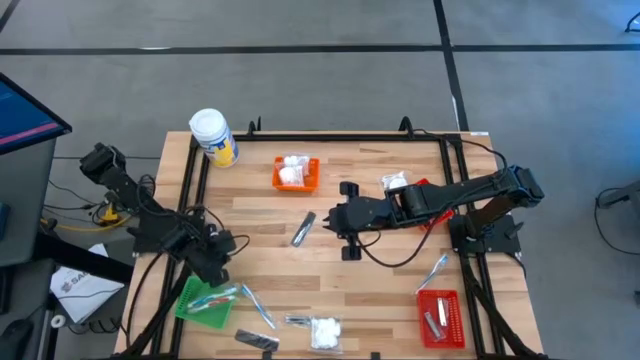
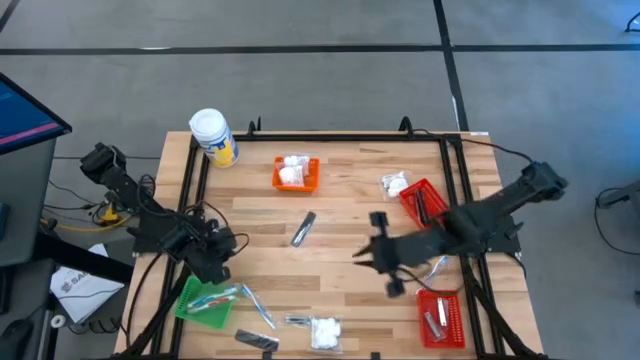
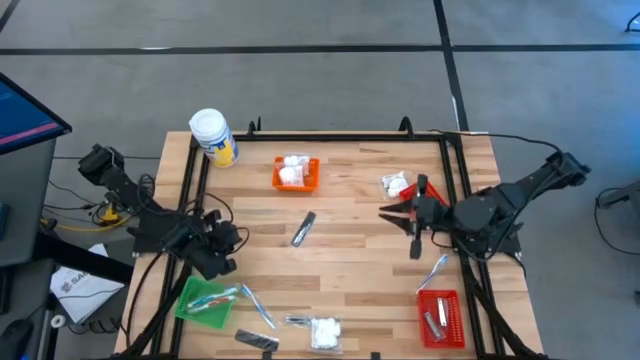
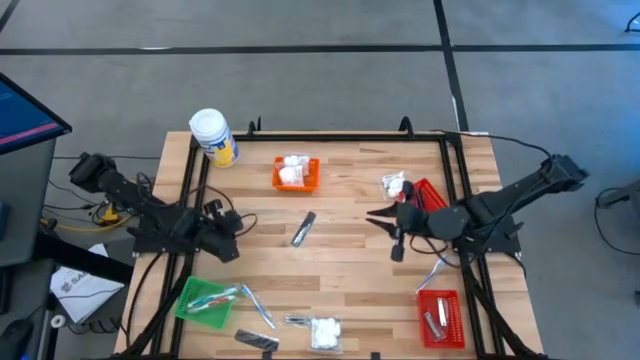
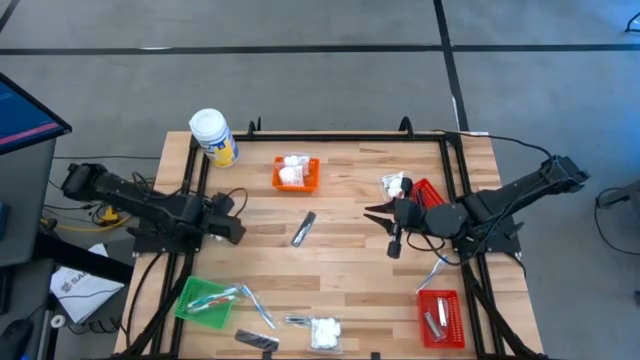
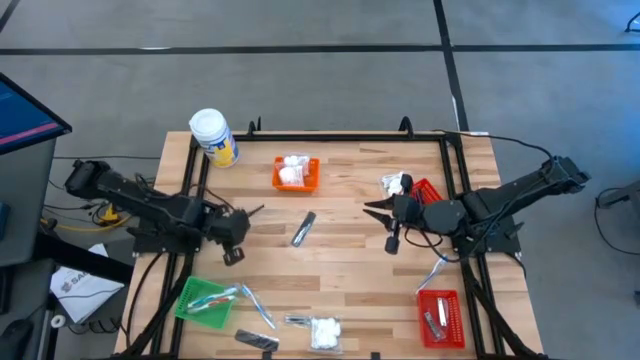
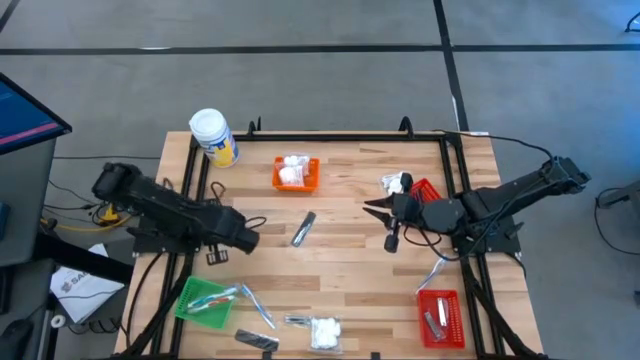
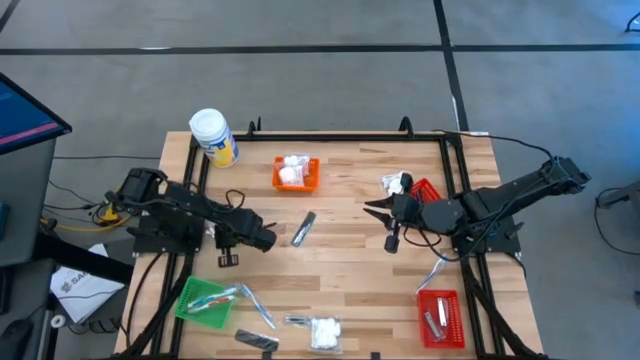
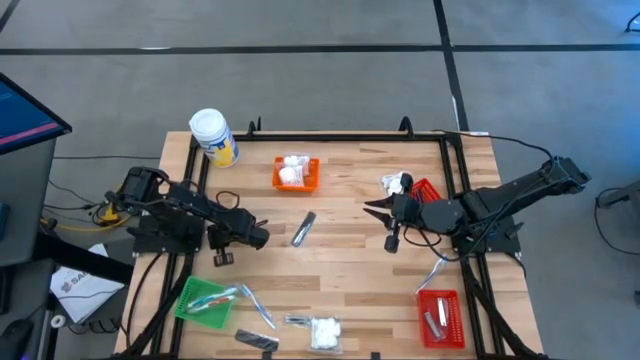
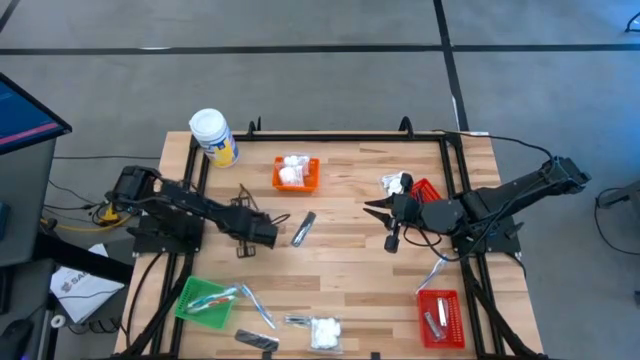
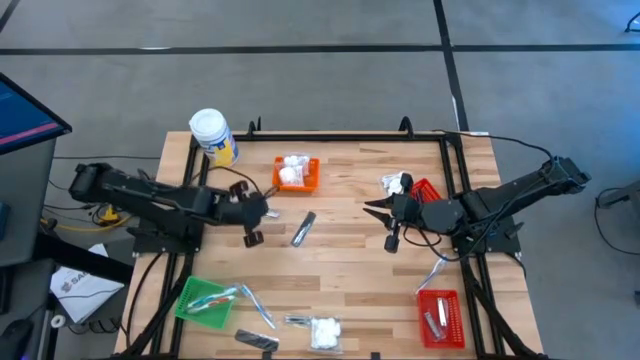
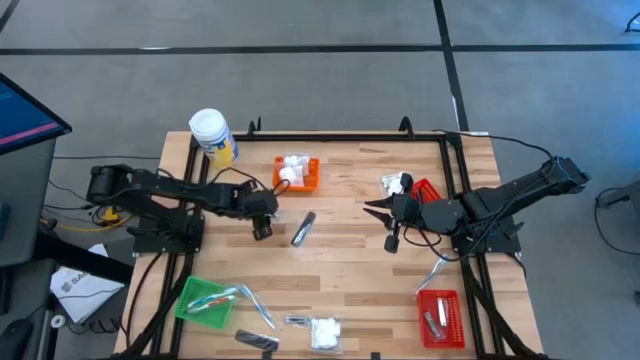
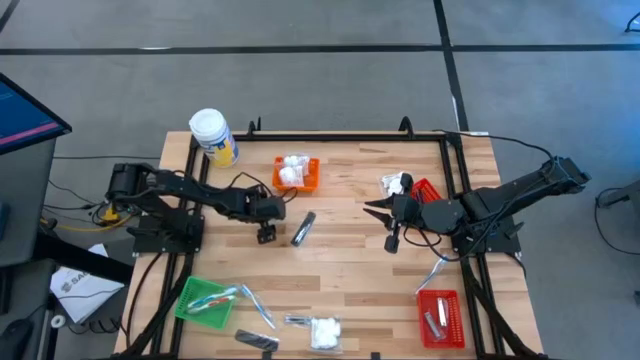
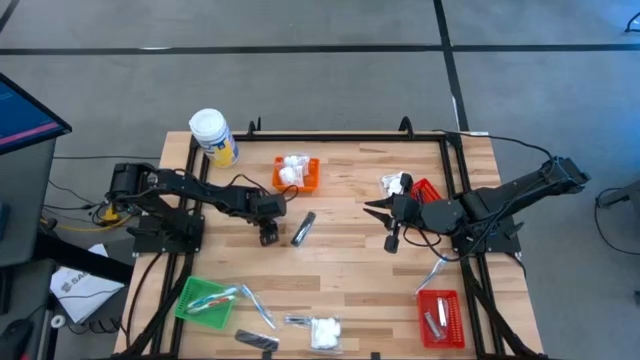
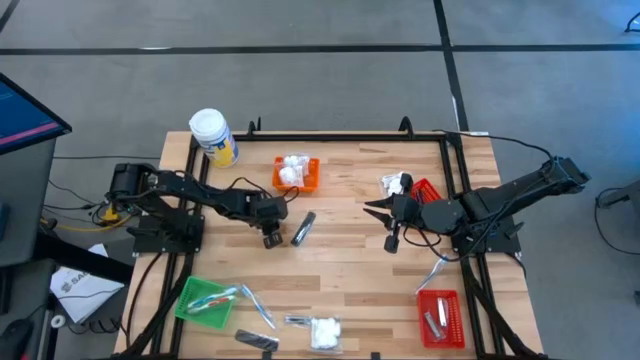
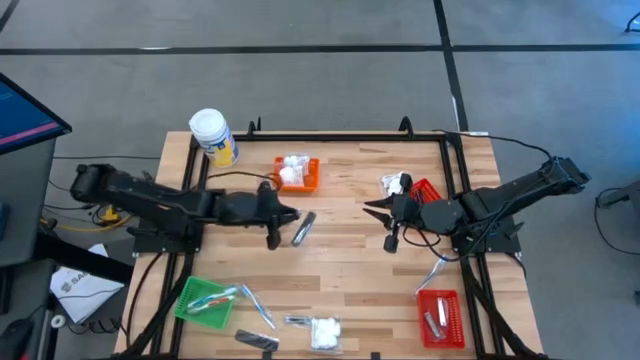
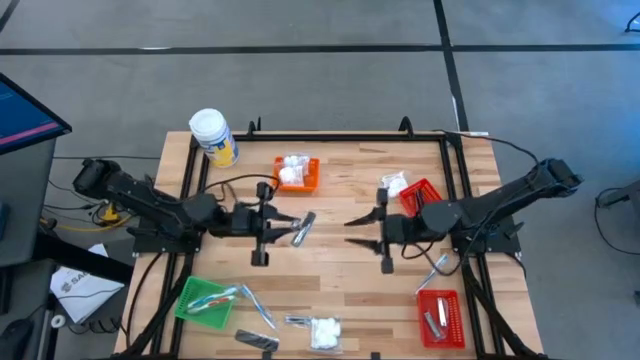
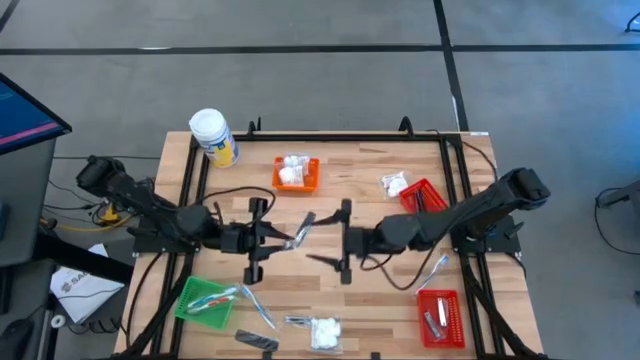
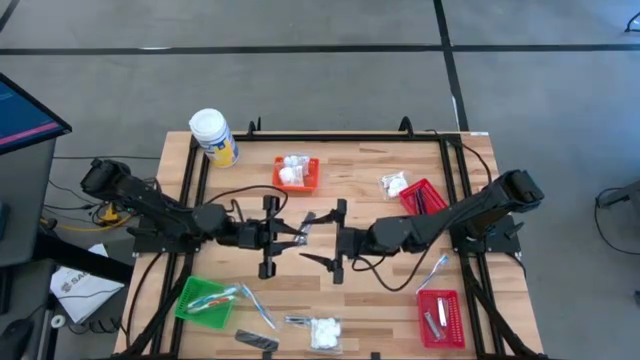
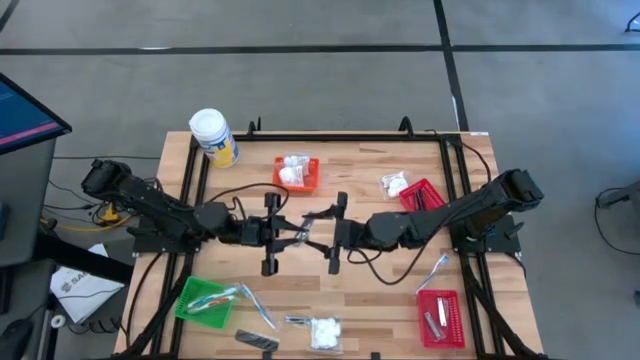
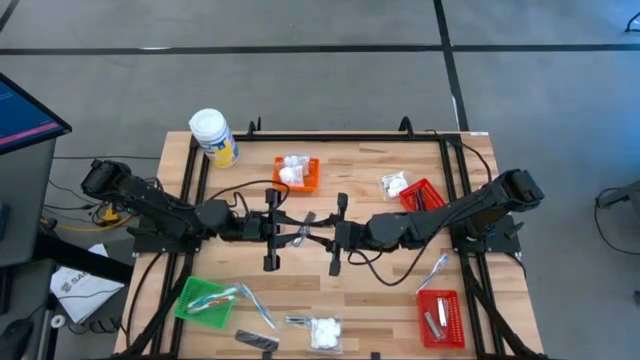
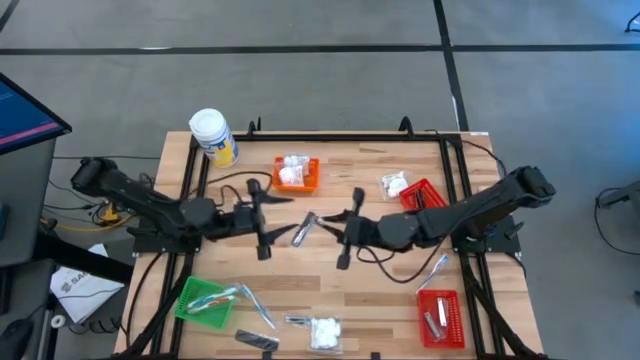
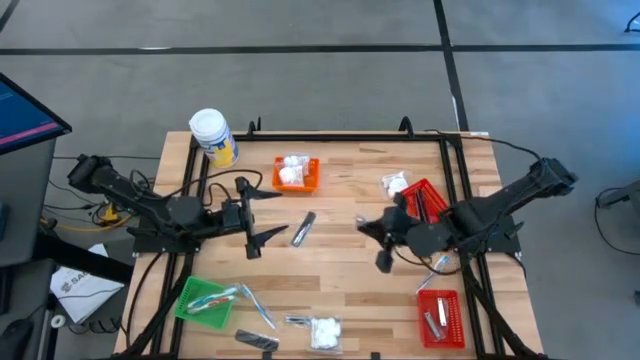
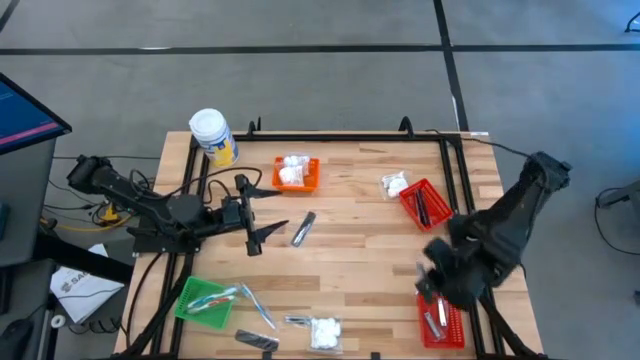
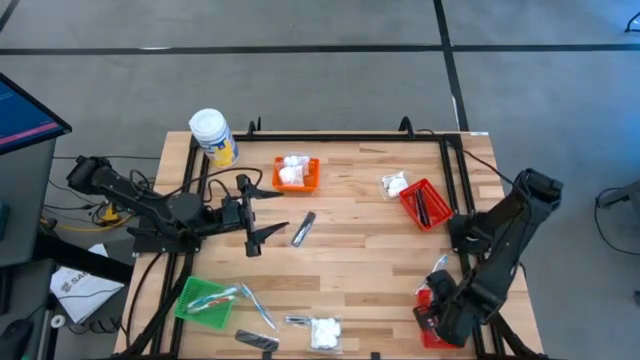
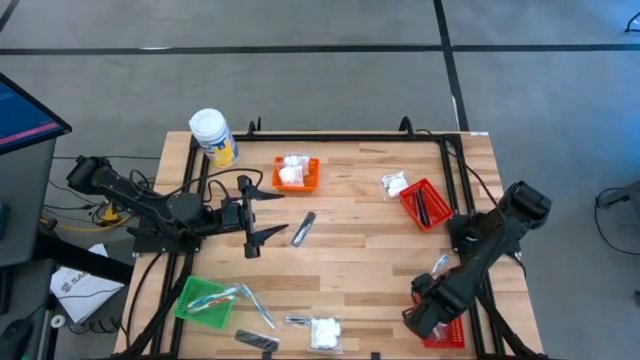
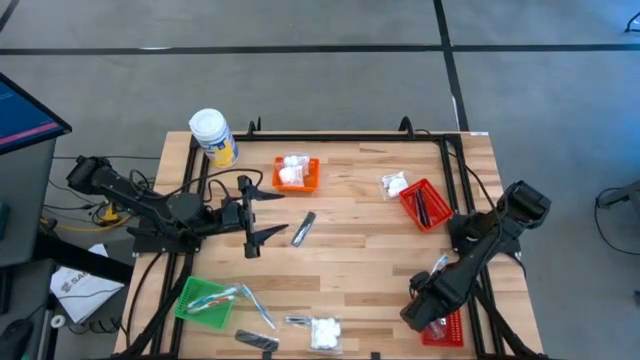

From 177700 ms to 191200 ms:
Task: Pick & Place Travel size toiletries
Put the silver nail cutter into the bottom red basket

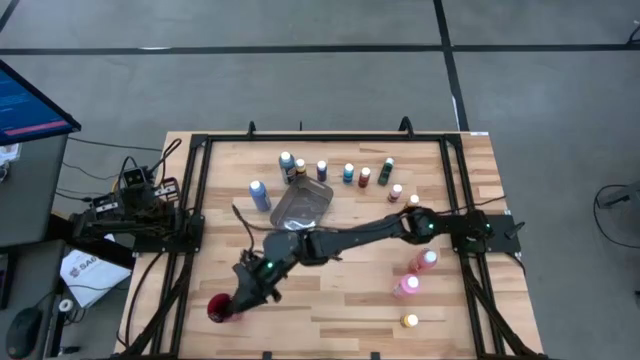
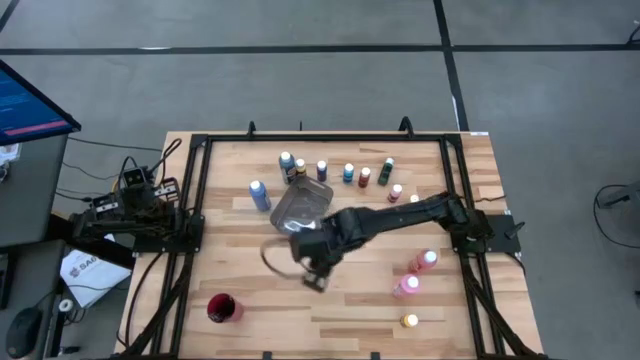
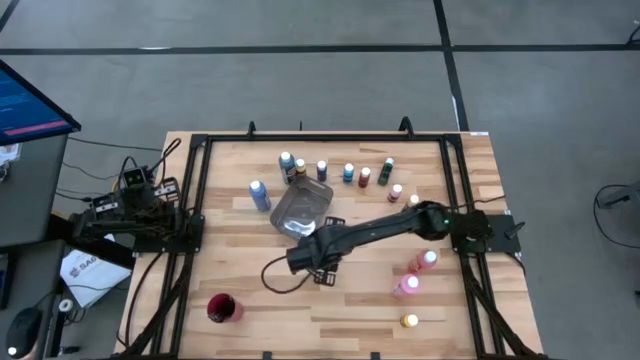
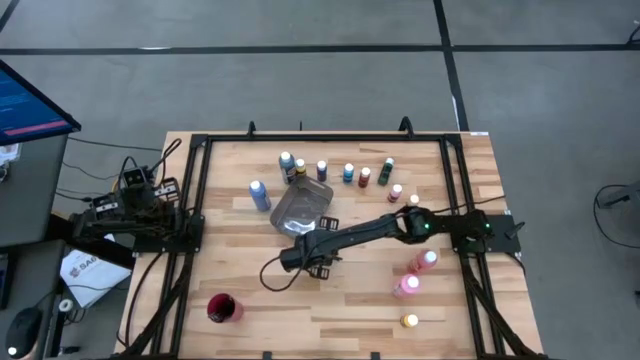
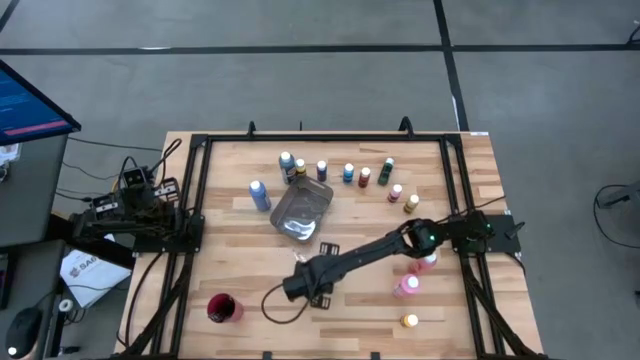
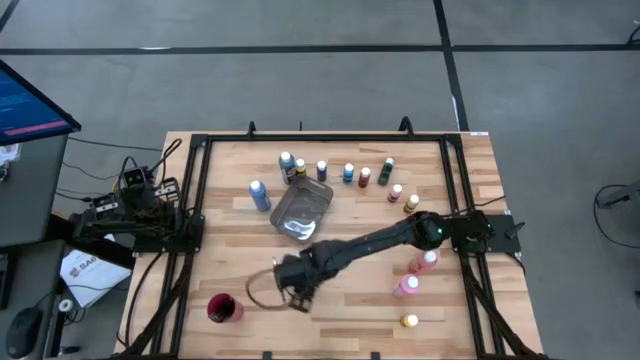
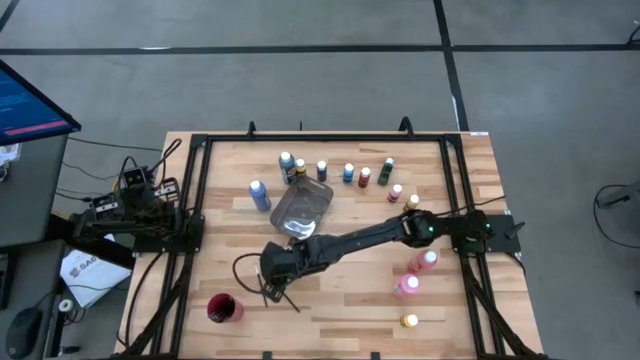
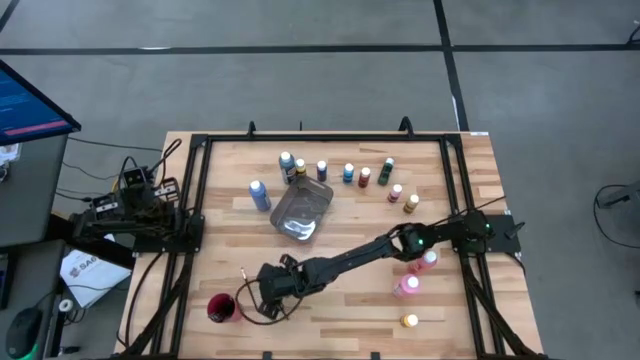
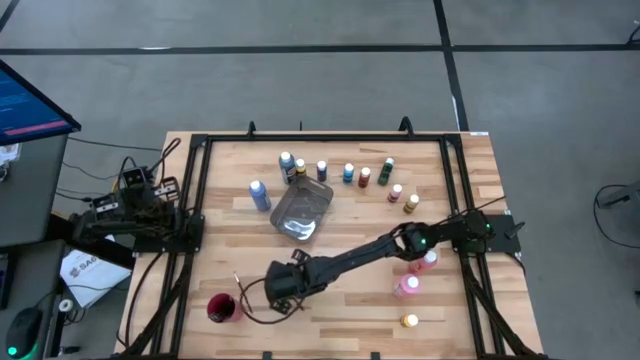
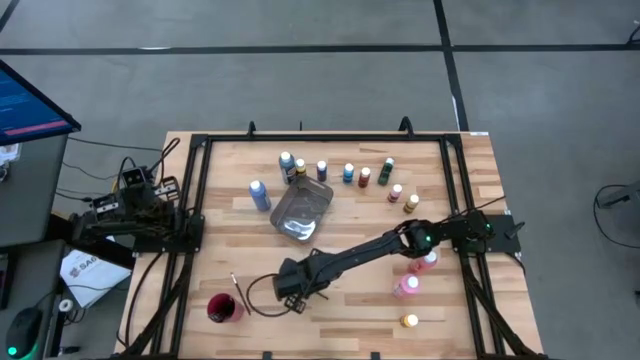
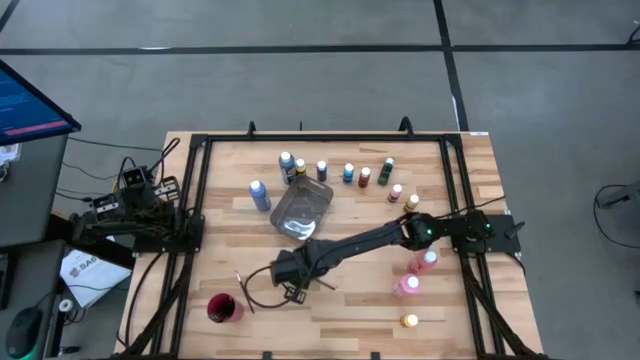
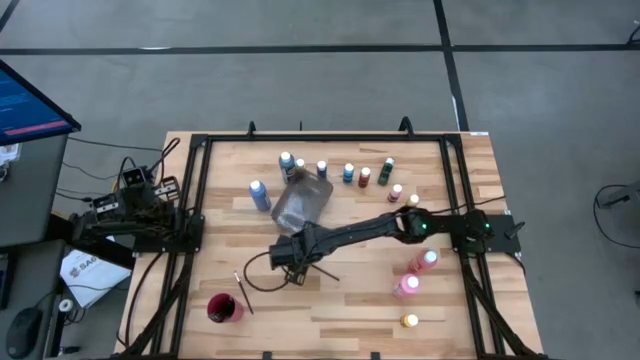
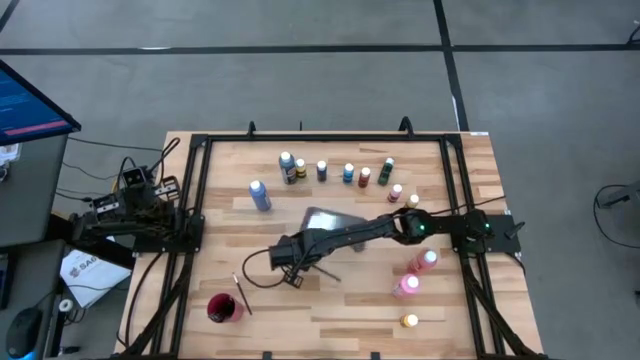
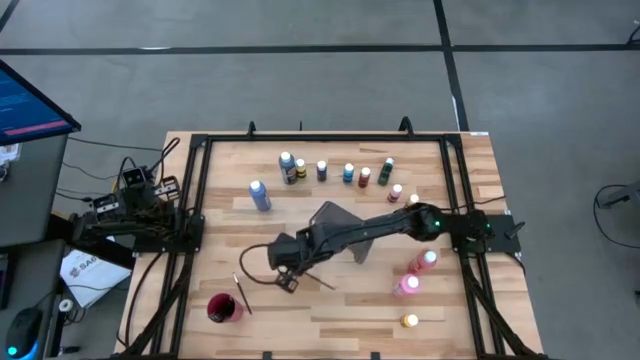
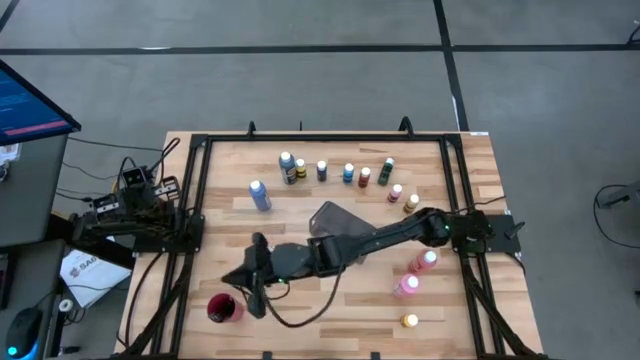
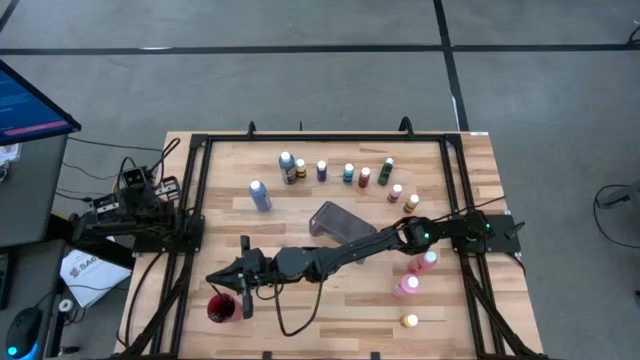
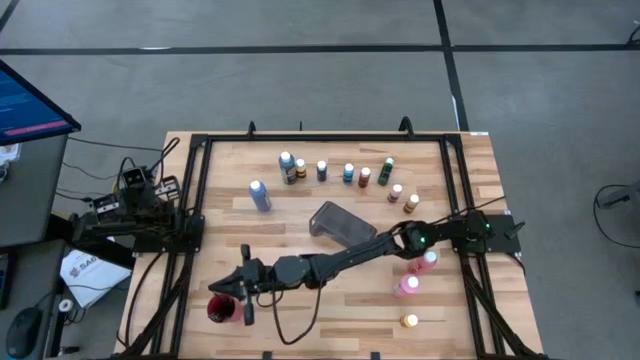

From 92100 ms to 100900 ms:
Task: Pick & Place Paint Supplies
Put the silver paintbrush into the red cup

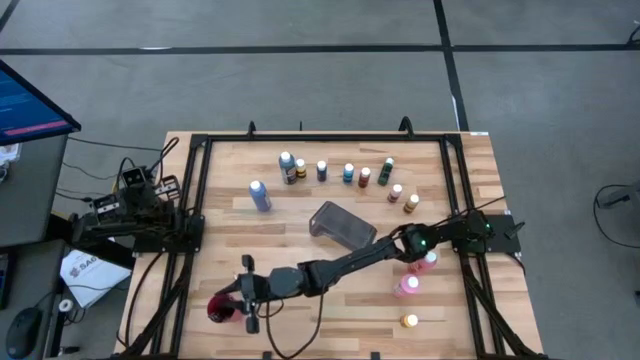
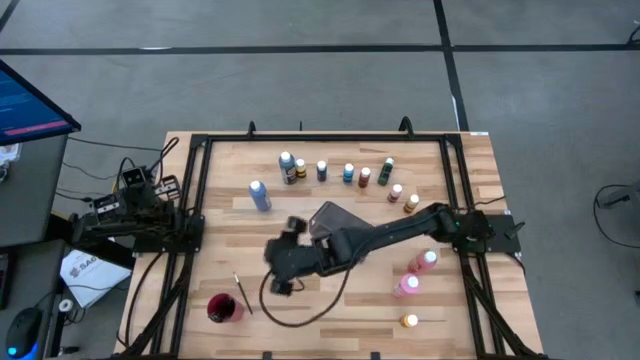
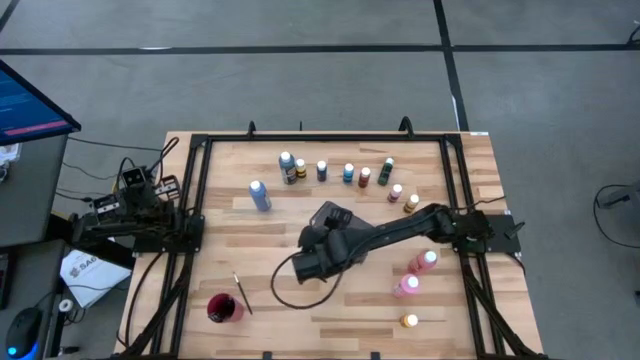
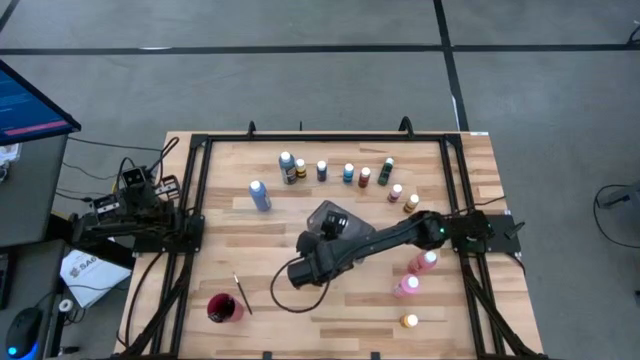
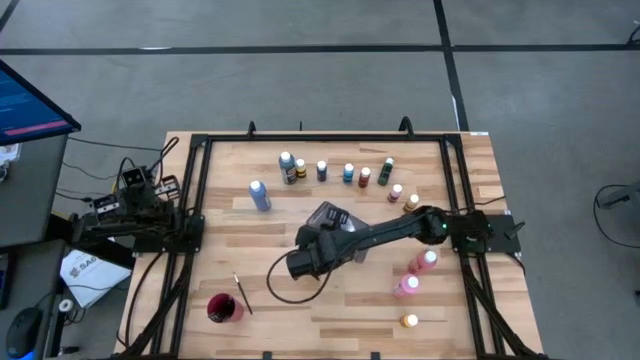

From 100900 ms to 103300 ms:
Adjust the black bin
